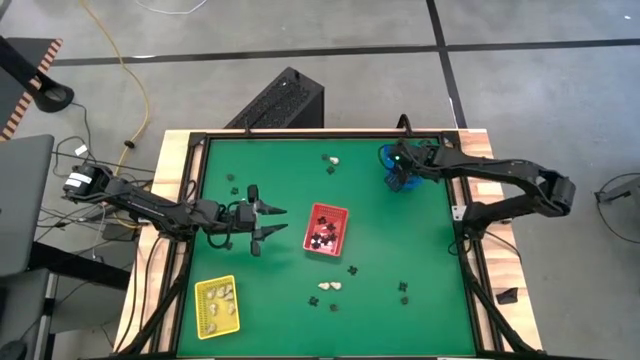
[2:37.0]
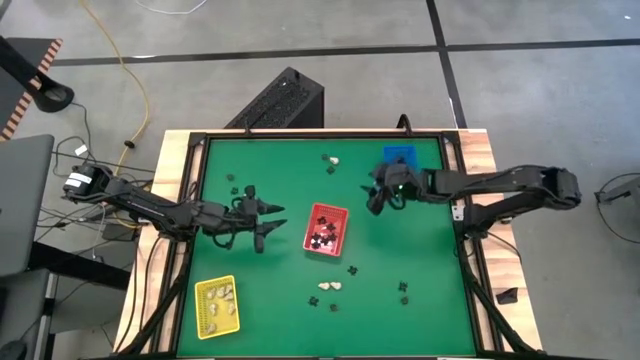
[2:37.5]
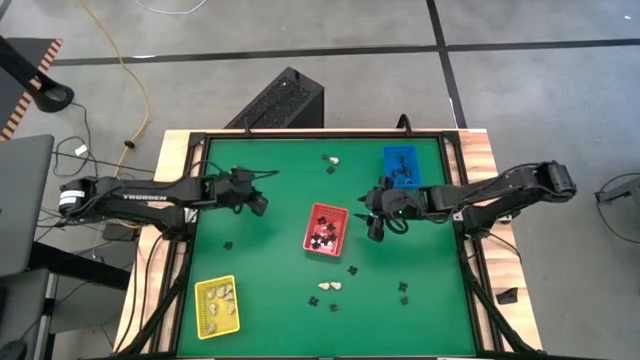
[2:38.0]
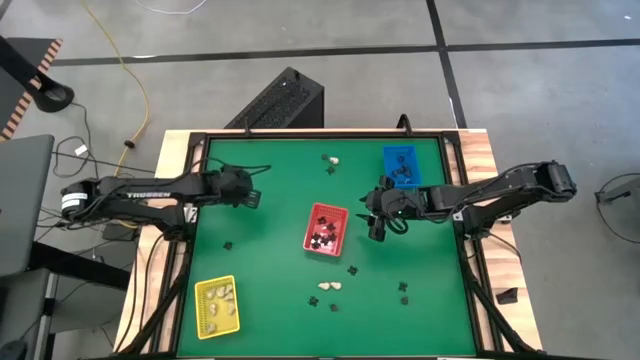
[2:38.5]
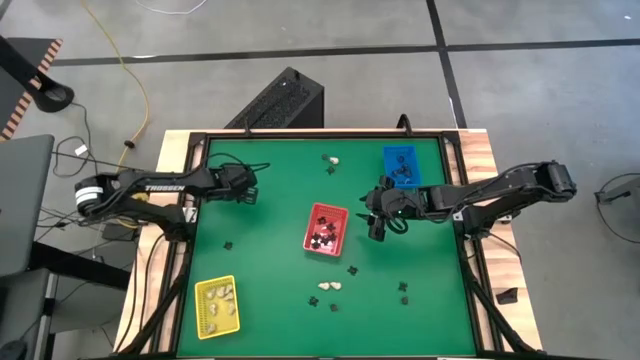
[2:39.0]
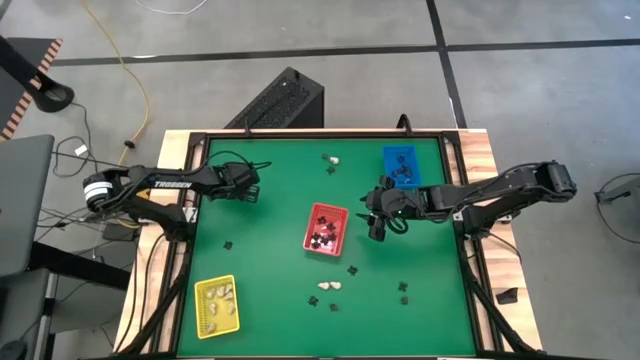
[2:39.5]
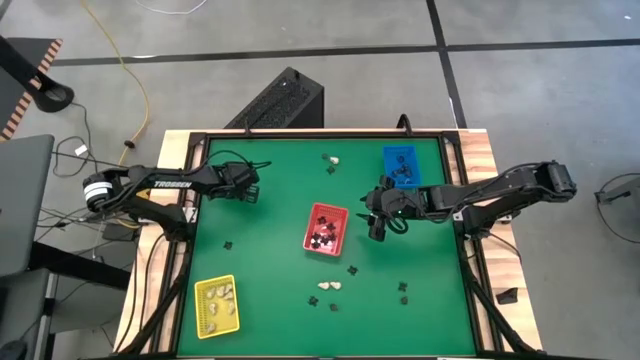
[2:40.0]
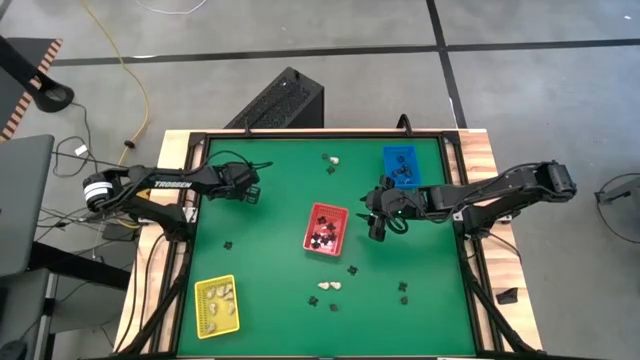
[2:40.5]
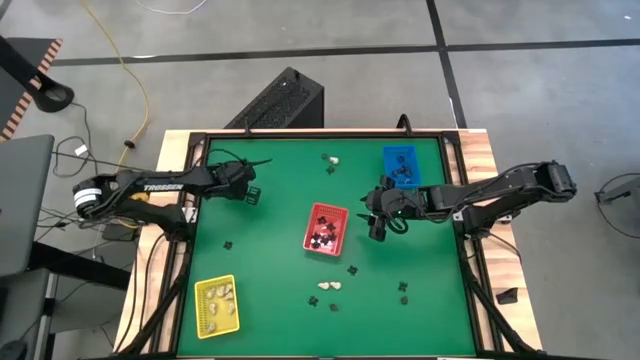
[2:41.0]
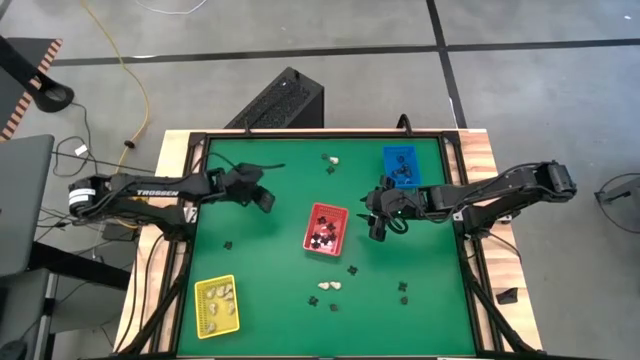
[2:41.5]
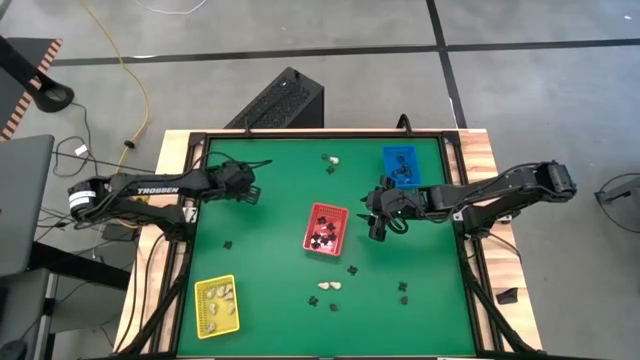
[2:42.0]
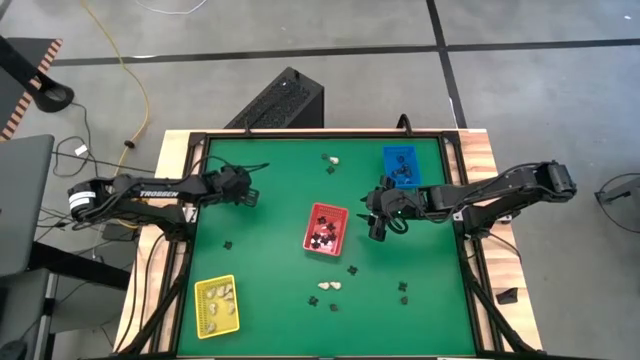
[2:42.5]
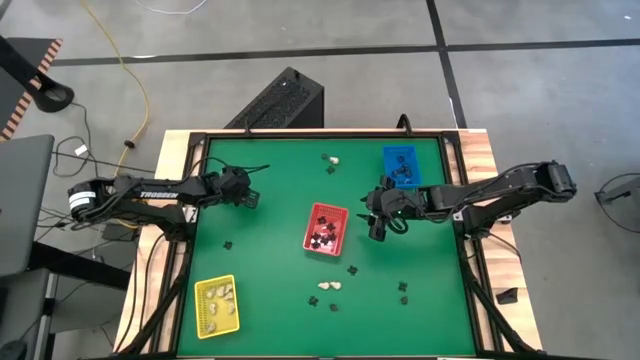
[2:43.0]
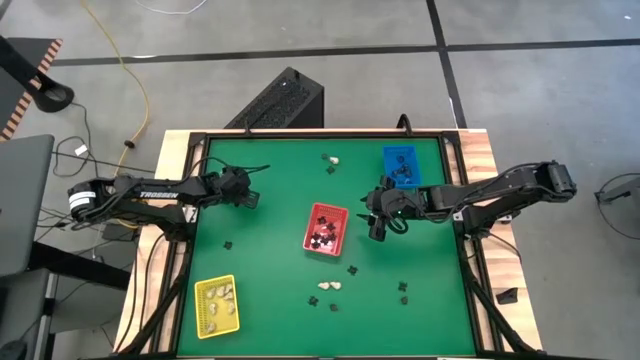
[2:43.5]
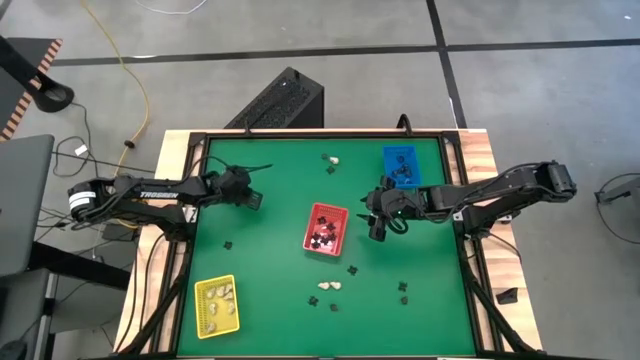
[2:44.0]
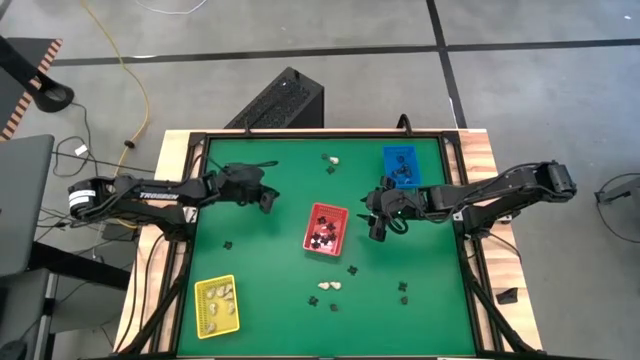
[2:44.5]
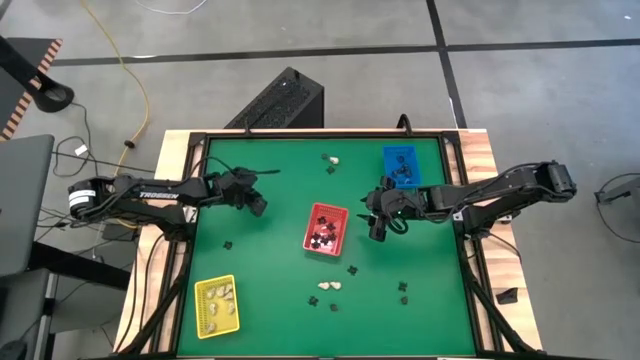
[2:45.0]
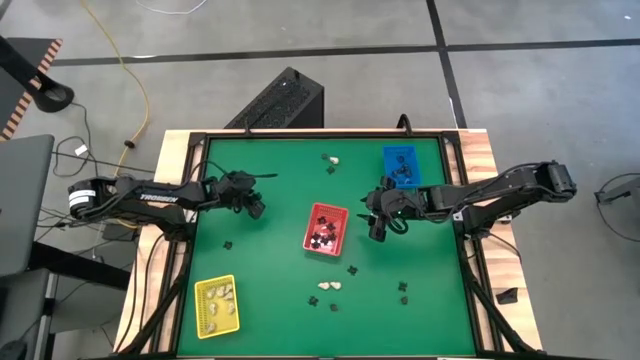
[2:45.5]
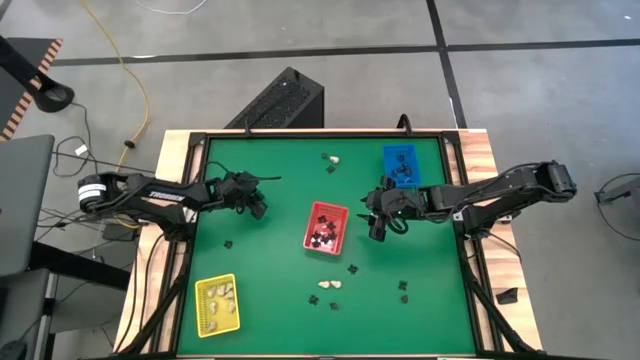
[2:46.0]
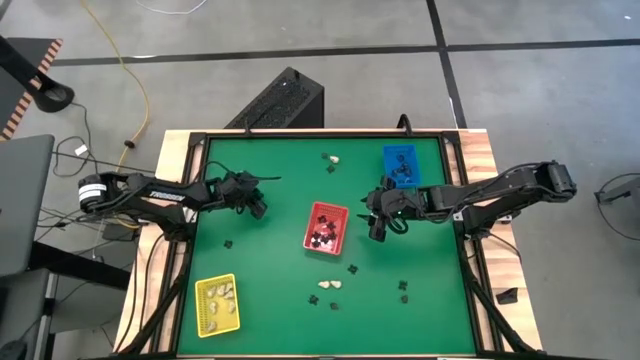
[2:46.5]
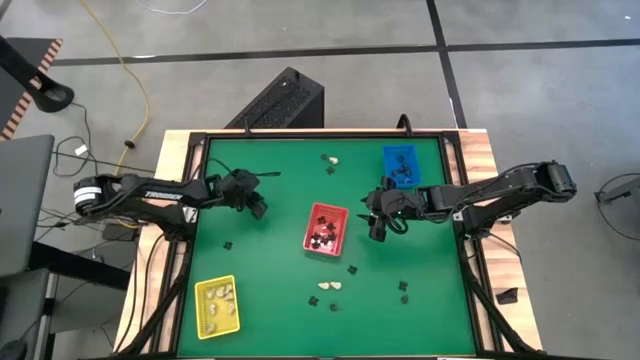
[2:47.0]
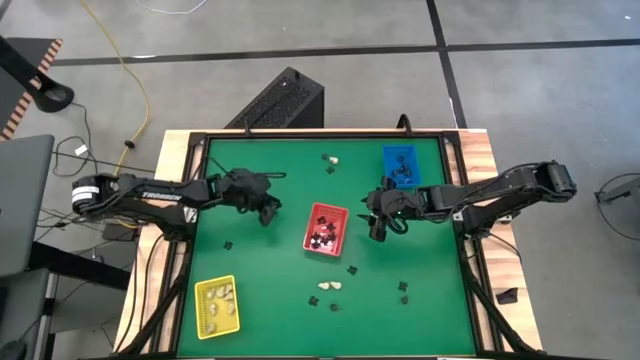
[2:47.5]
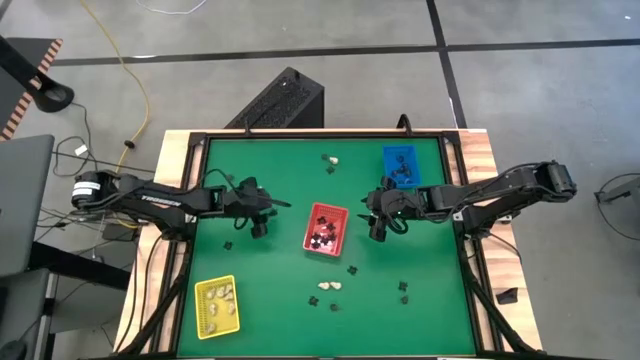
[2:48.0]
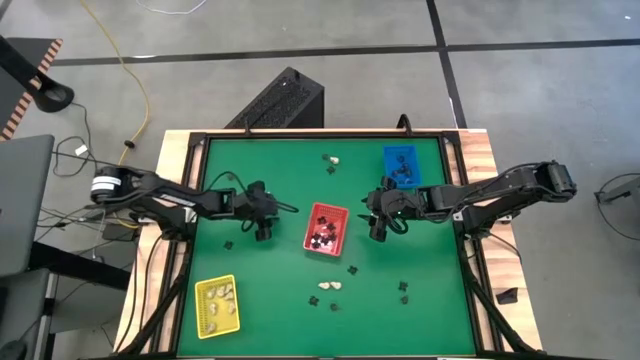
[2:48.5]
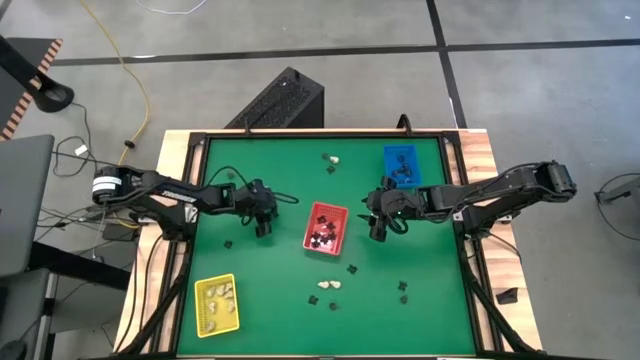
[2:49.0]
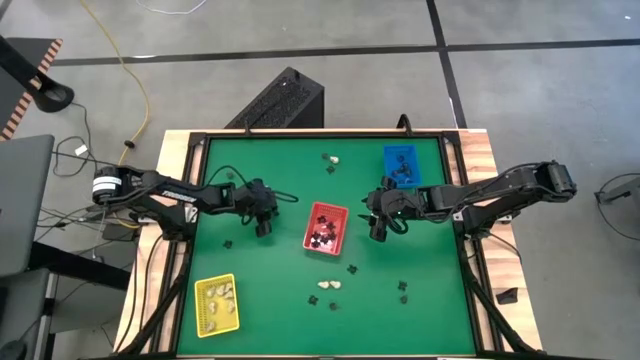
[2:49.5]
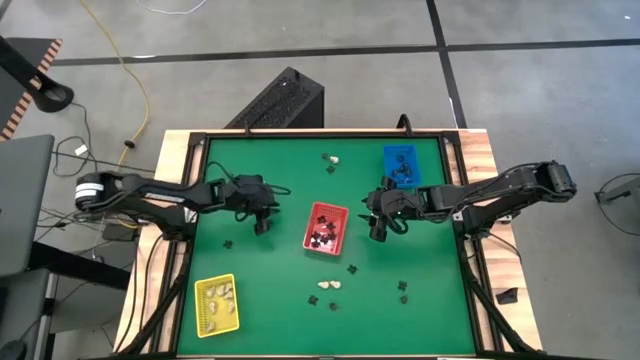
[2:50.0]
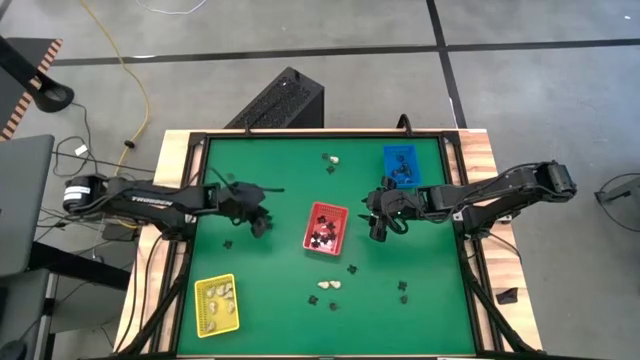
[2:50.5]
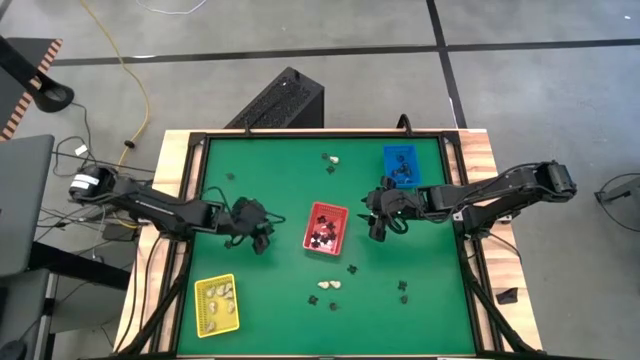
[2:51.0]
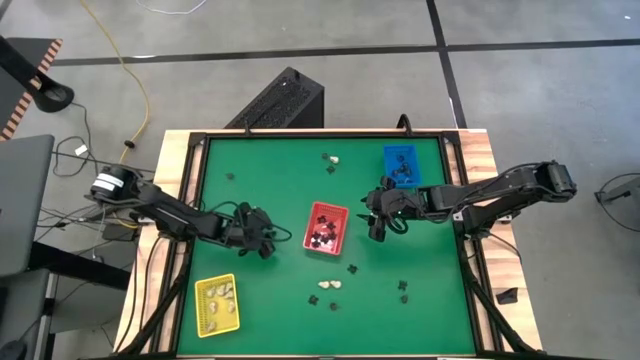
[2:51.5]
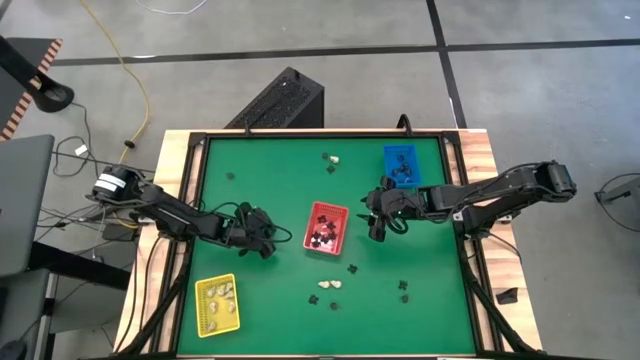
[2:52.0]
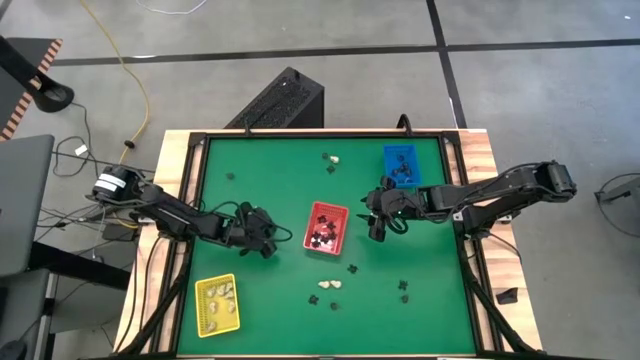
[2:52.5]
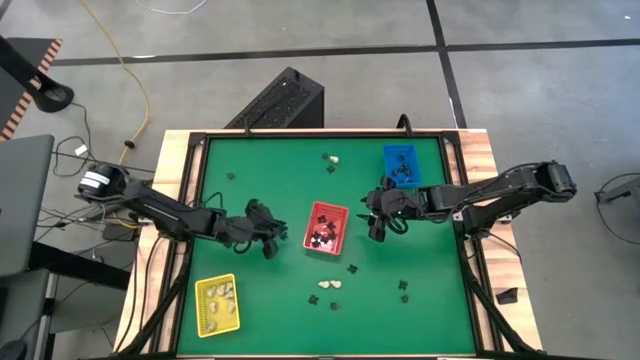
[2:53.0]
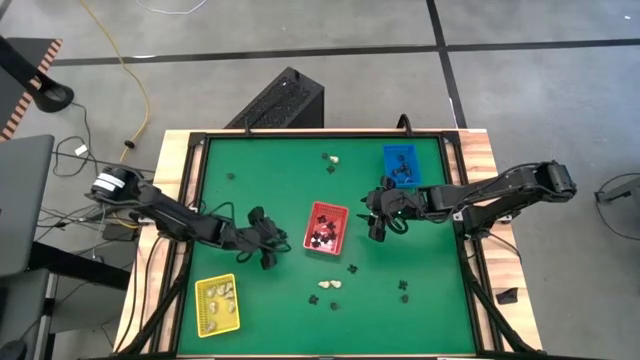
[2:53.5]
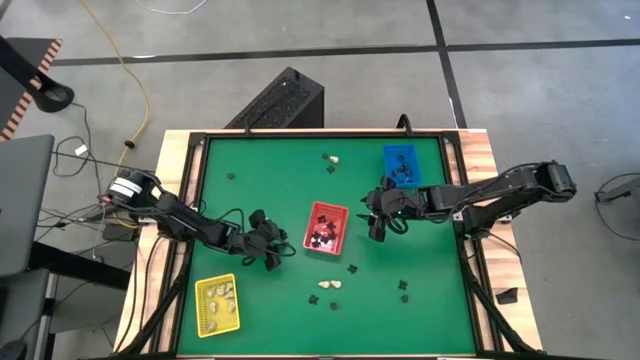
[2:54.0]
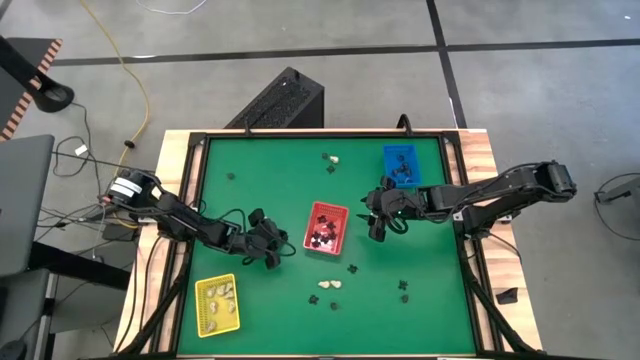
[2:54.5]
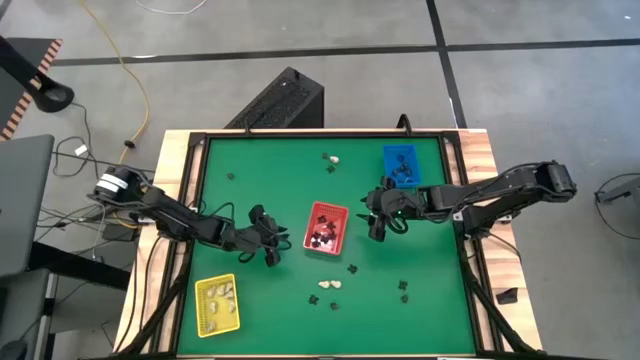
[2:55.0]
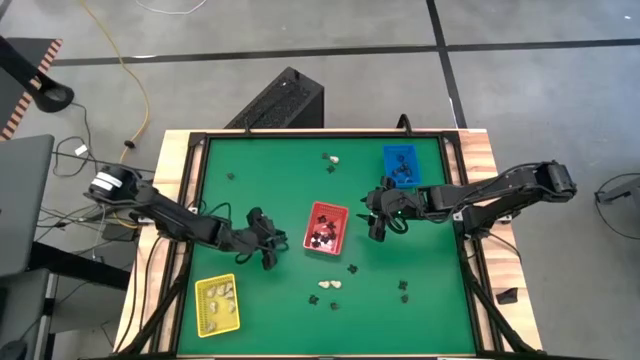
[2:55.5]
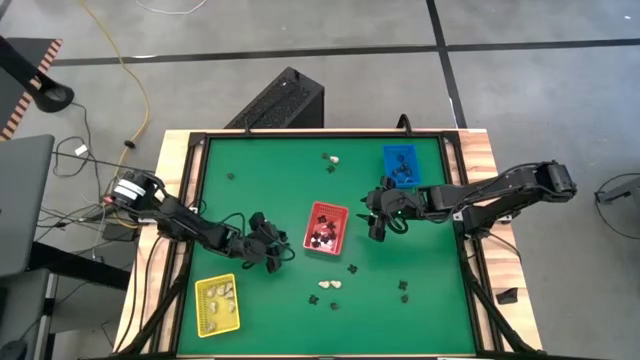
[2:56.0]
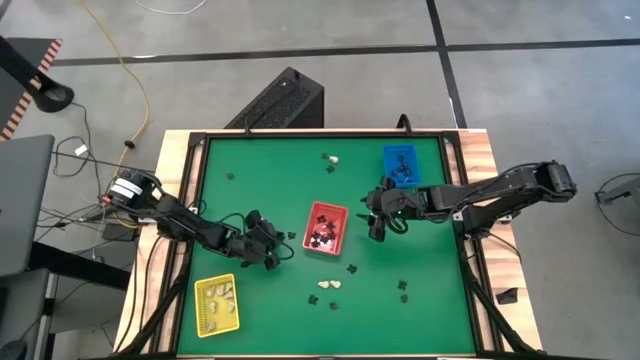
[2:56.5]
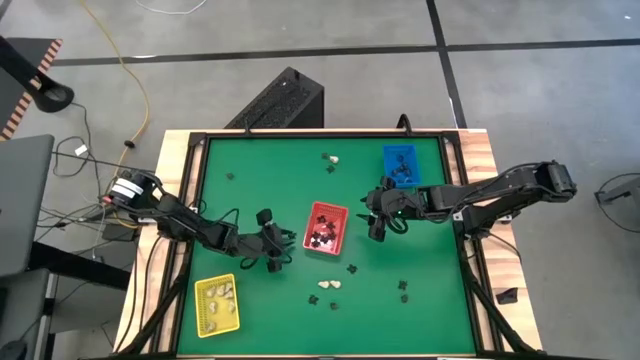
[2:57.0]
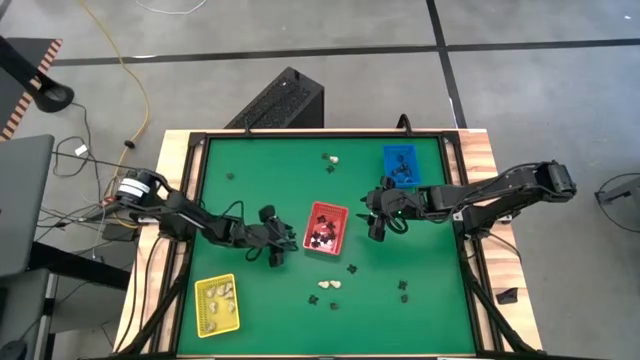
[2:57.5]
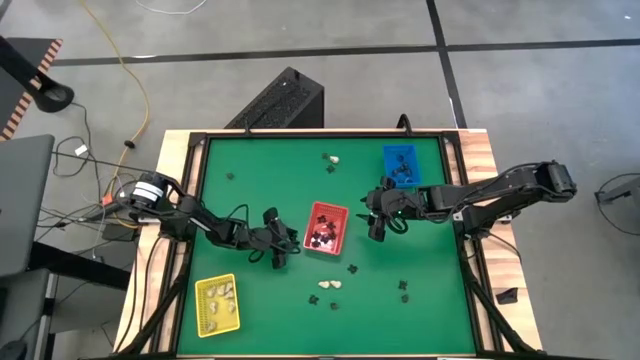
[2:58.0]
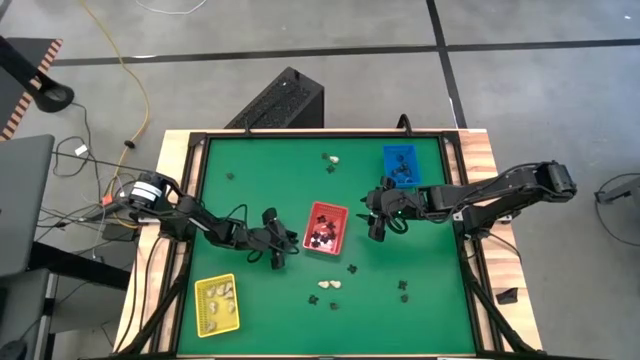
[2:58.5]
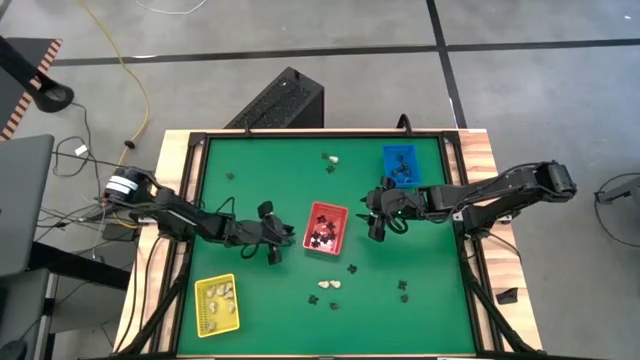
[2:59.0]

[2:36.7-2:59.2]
Task: Sort Halloween decoration
Put the black spider toy into the red bin
